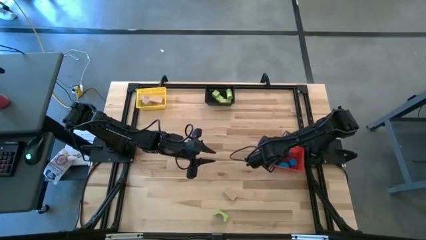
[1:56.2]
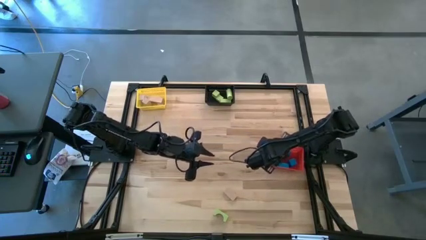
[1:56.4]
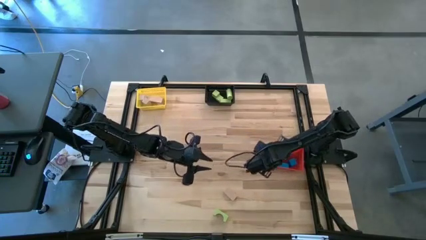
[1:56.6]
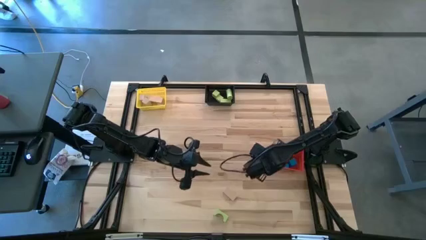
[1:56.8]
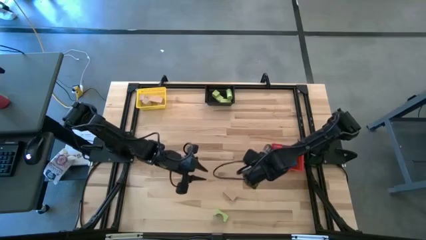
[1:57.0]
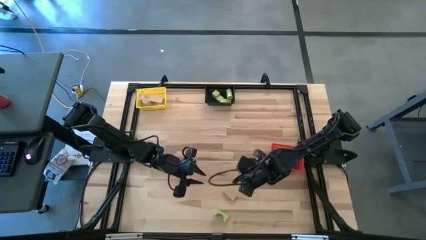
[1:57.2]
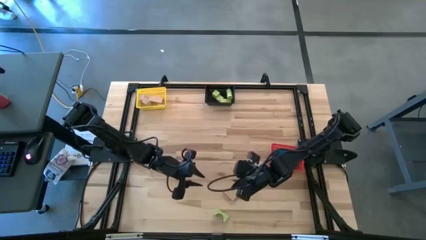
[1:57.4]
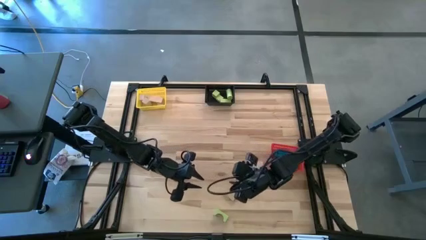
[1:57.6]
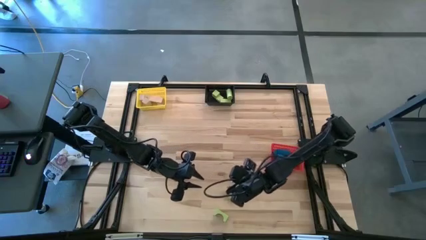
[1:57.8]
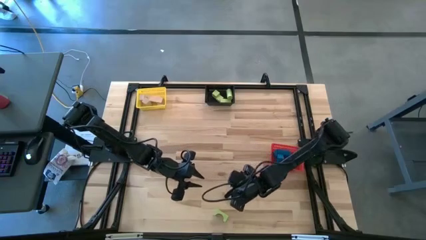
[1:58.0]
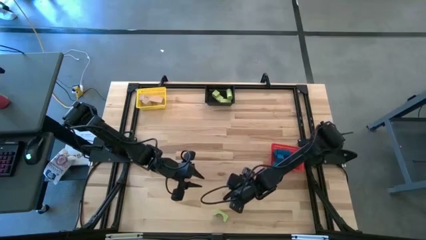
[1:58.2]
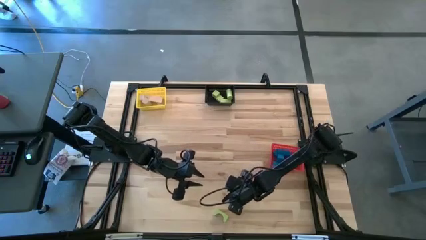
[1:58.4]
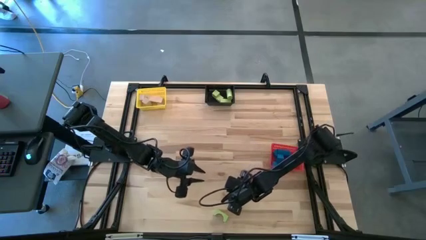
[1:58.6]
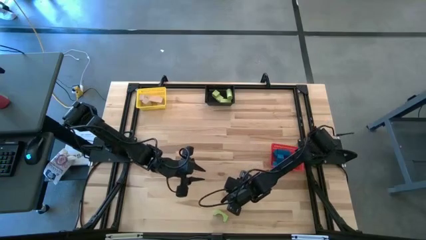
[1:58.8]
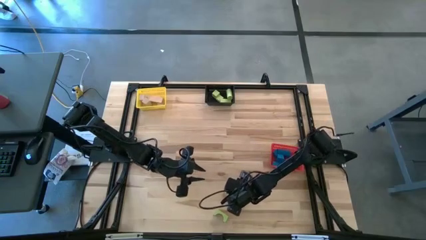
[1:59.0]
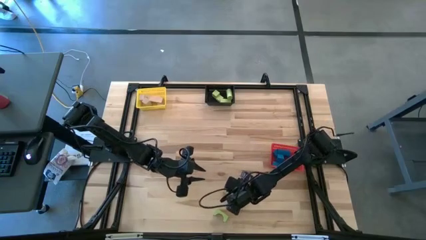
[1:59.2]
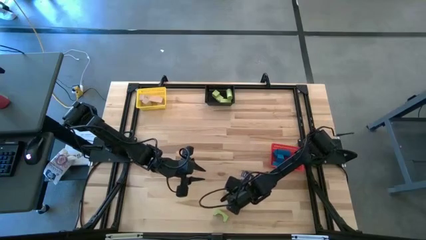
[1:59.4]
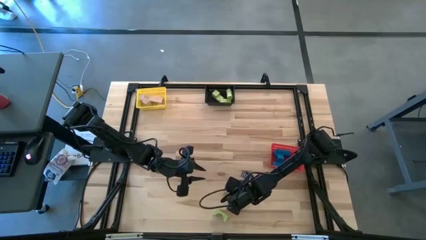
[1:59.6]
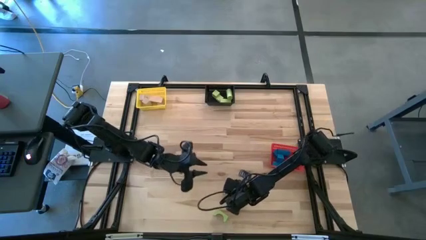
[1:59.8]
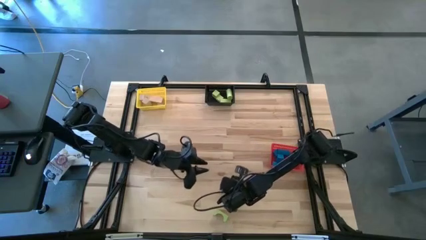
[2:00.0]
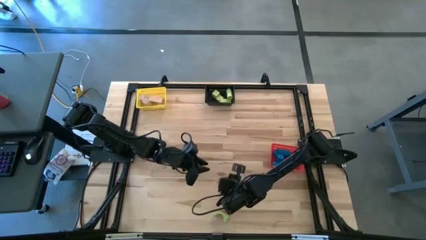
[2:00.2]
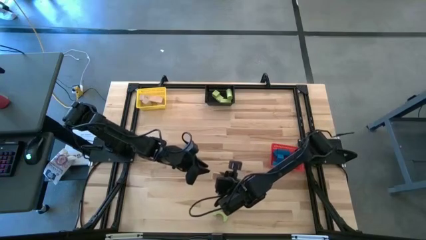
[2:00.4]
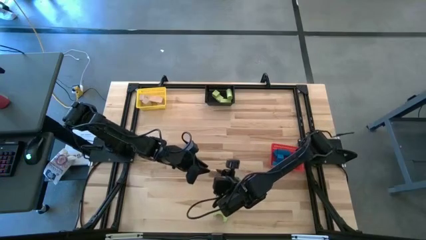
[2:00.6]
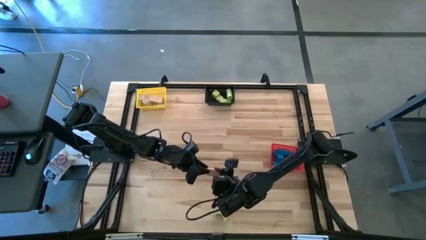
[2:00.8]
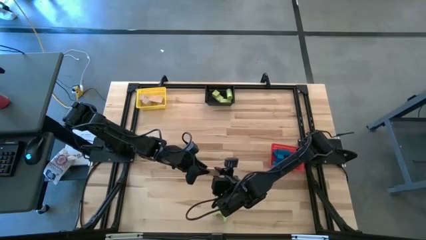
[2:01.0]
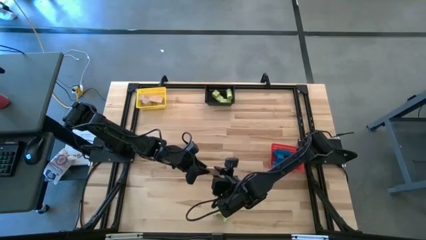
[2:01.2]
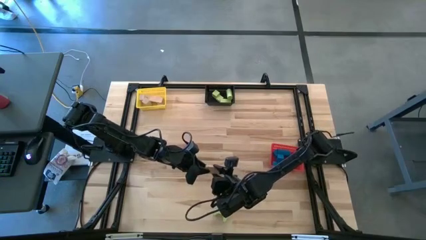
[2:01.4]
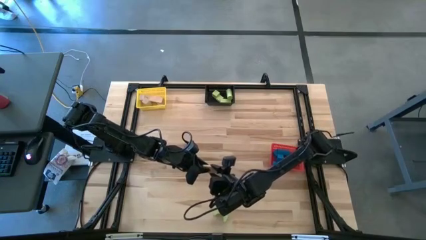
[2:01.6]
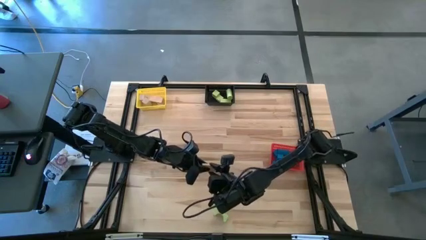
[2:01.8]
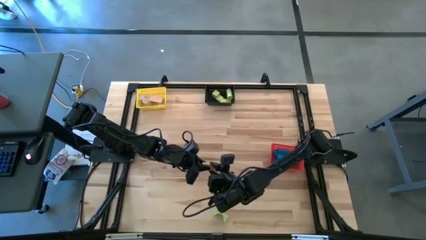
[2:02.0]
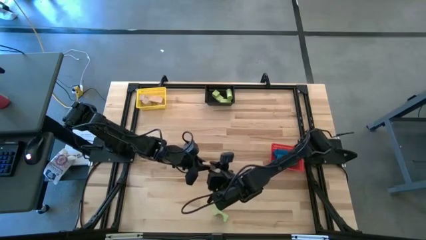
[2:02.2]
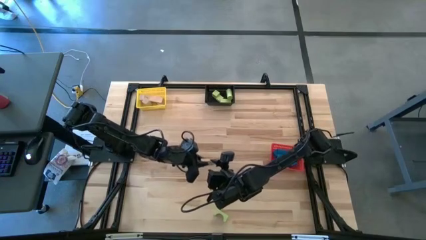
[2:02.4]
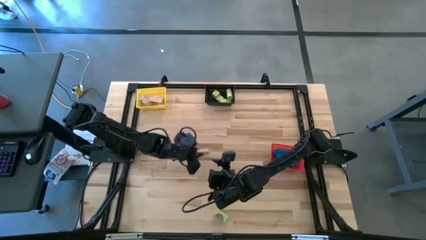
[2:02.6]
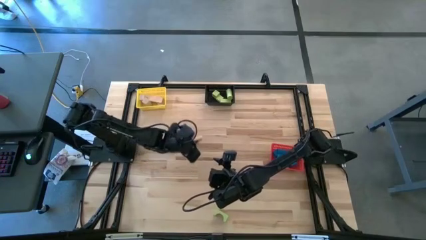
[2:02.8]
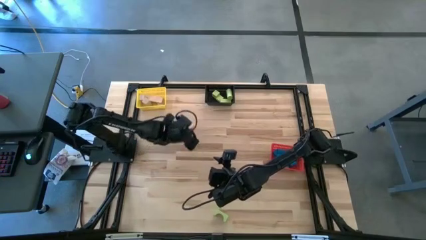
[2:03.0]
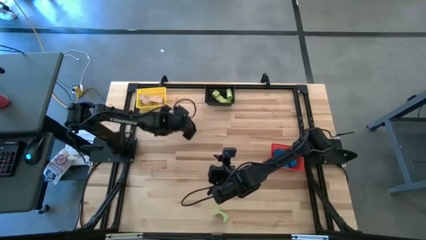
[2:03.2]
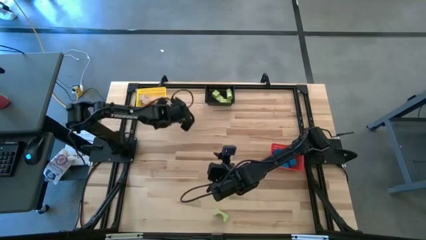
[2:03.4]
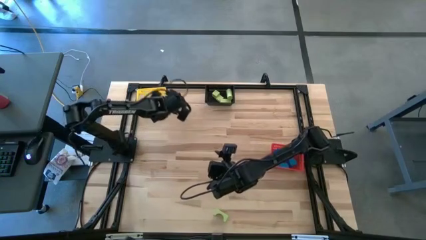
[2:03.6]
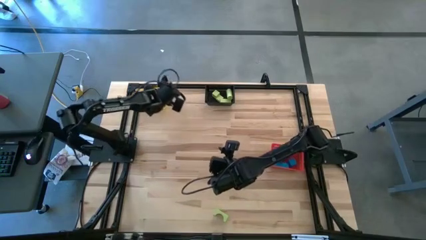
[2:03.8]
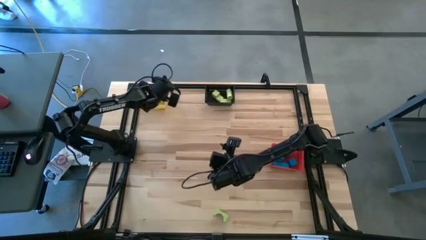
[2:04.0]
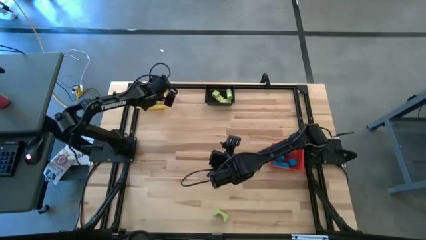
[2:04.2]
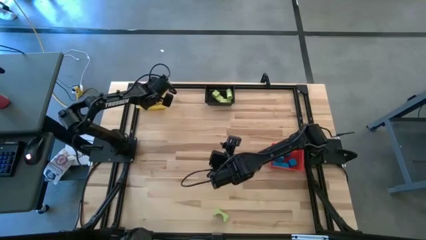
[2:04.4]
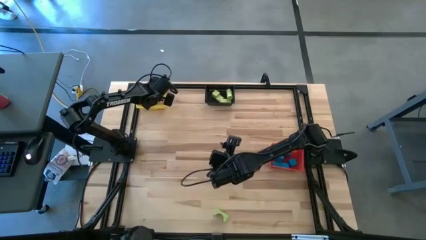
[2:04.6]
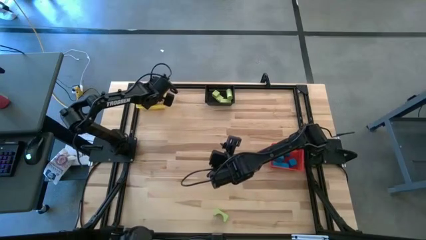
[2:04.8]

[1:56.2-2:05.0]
Task: Sort & place blocks by color
Put the brown block into the yellow basket

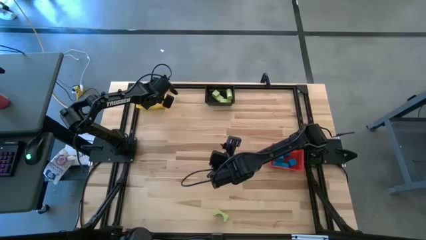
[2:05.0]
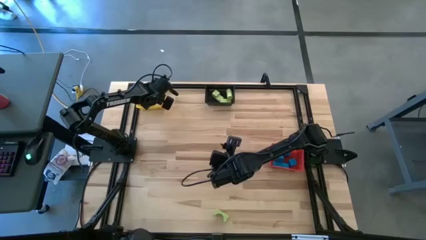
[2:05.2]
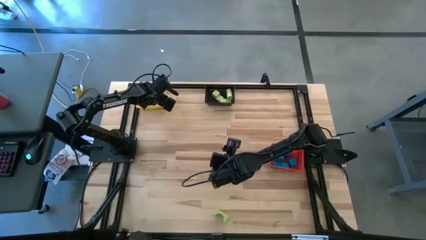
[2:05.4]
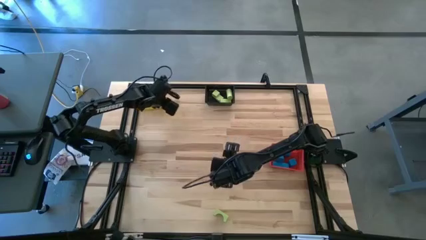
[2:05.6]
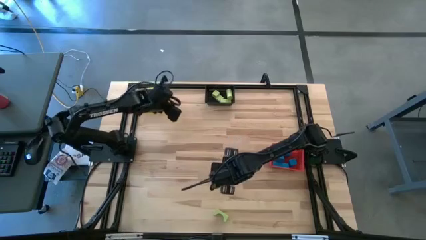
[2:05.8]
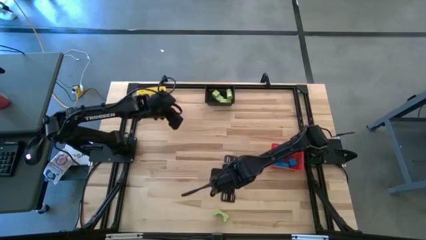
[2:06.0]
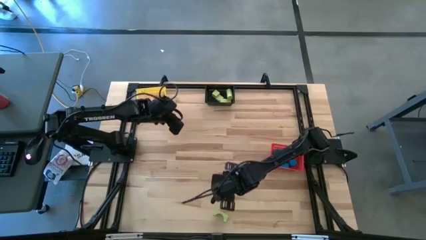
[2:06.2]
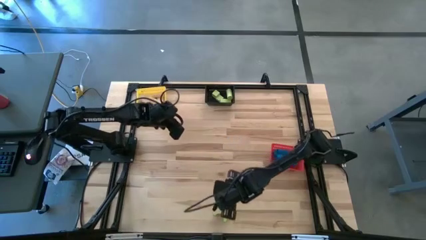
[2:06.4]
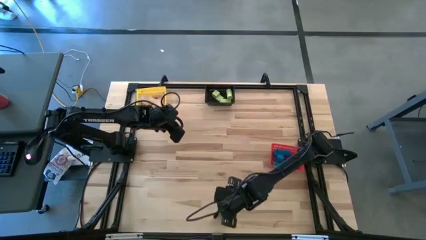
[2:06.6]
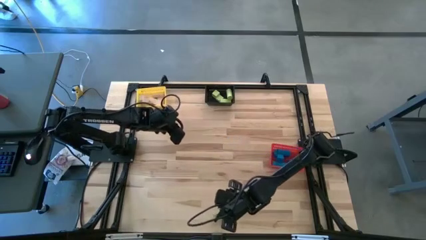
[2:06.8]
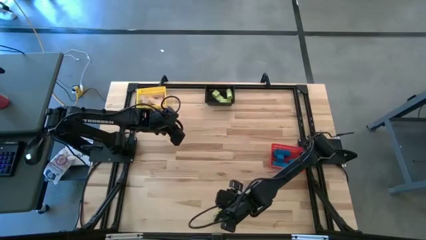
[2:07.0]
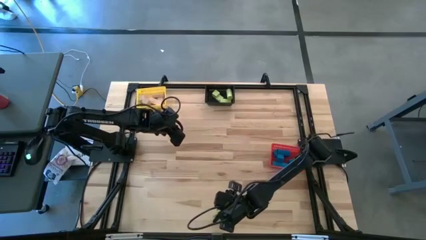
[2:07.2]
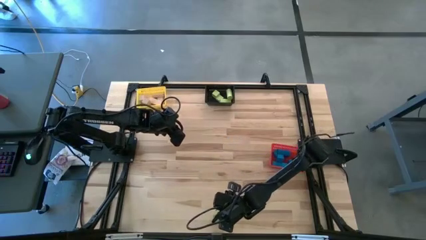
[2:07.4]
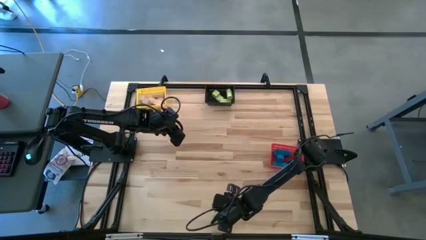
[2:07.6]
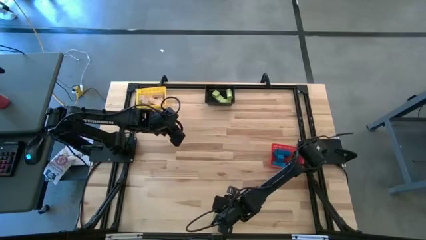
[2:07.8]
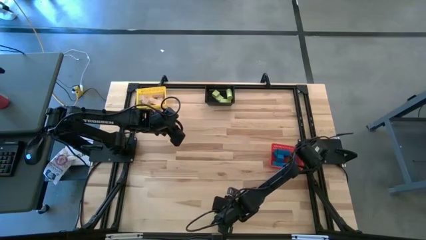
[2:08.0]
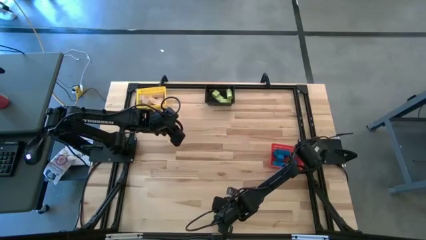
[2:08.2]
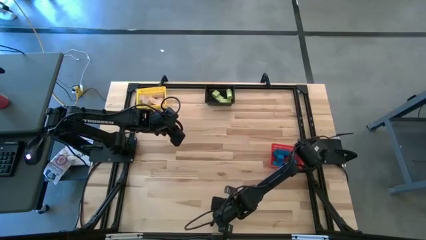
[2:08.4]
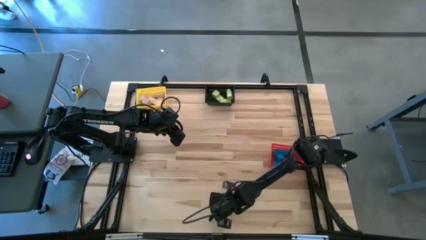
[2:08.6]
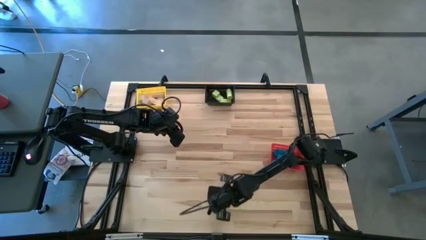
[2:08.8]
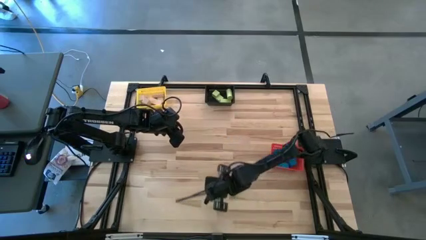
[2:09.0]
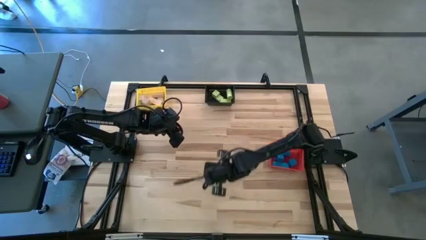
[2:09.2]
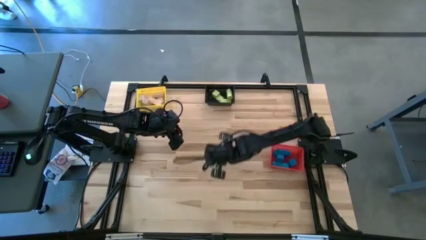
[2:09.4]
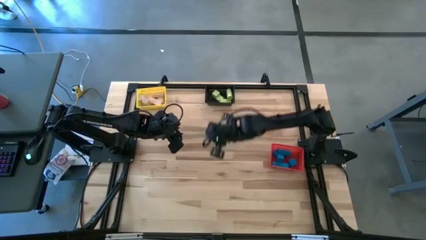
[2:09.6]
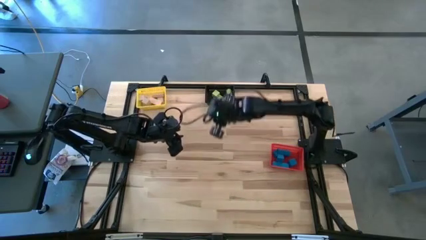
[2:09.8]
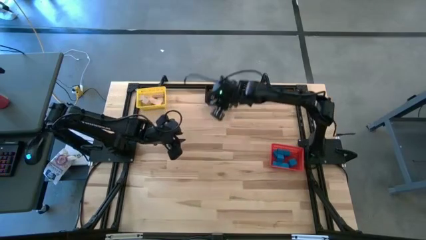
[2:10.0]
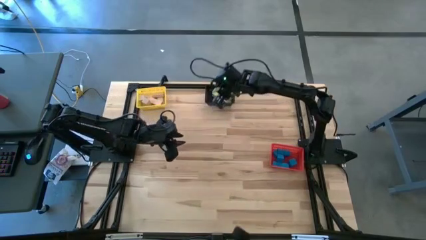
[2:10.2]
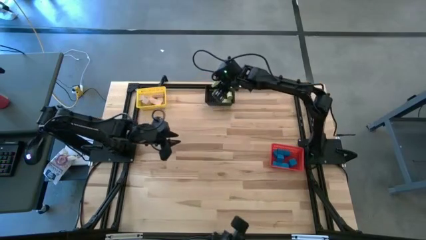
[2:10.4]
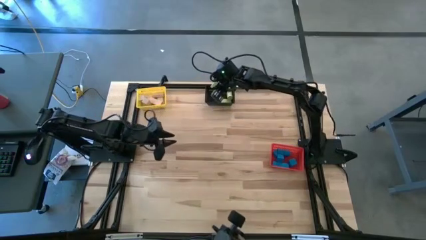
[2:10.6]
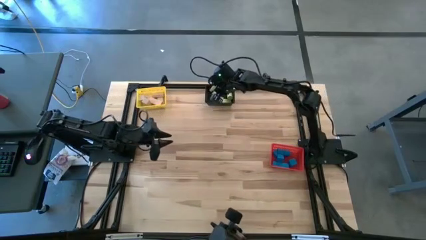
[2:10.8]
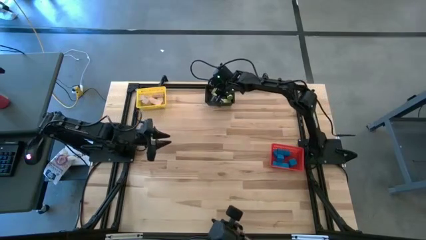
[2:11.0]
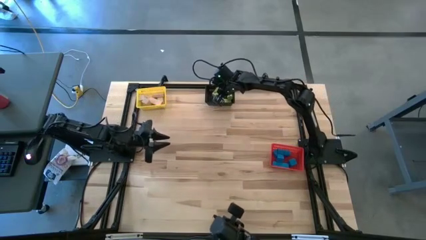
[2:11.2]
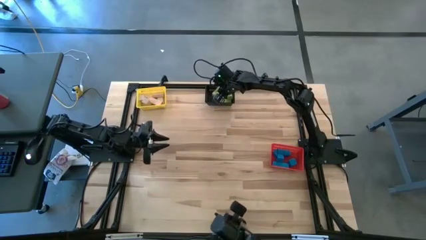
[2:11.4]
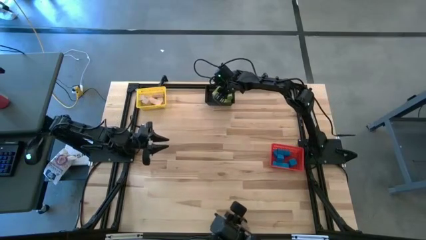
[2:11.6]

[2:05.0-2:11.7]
Put the green block into the black basket
